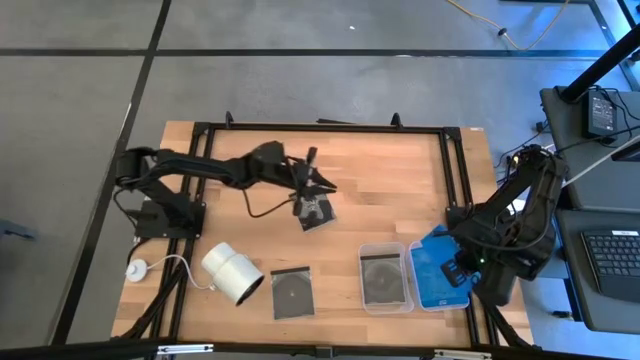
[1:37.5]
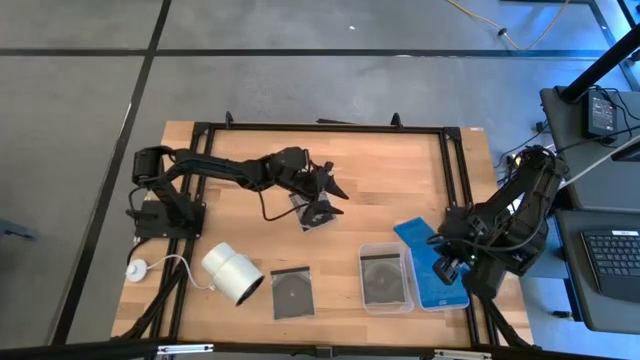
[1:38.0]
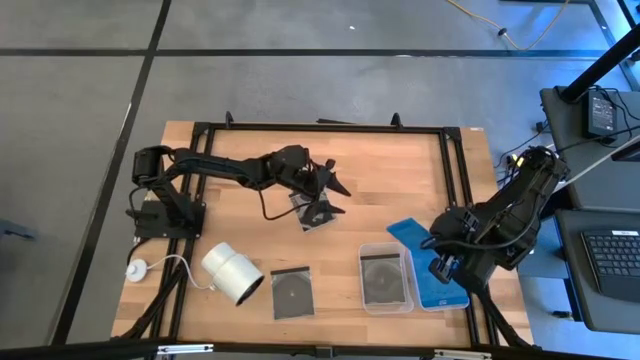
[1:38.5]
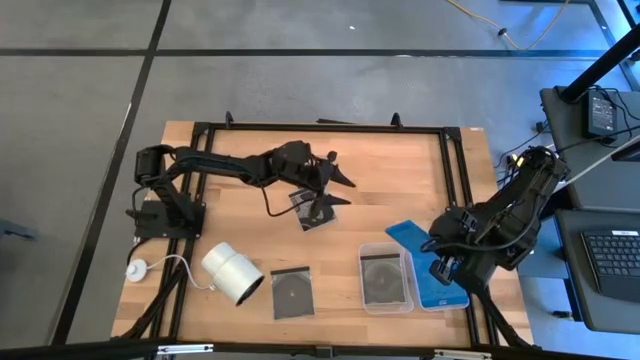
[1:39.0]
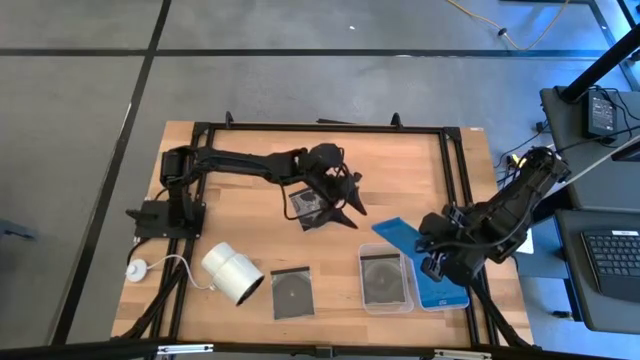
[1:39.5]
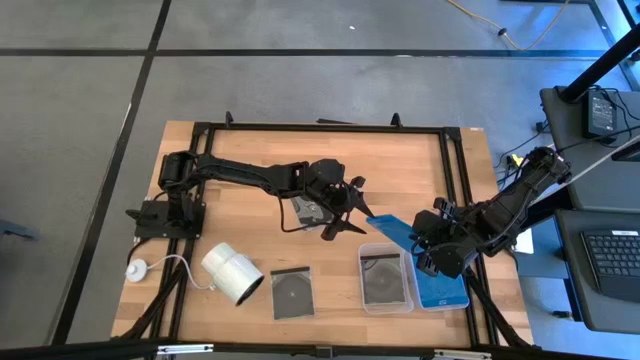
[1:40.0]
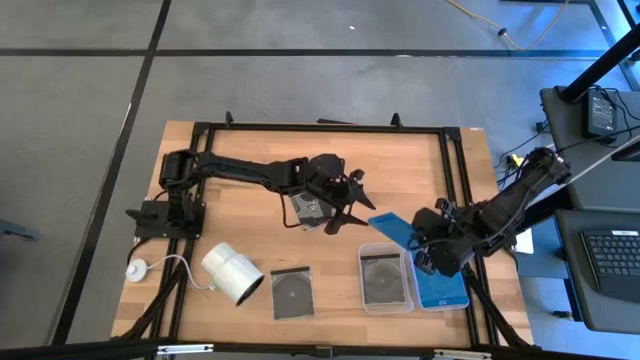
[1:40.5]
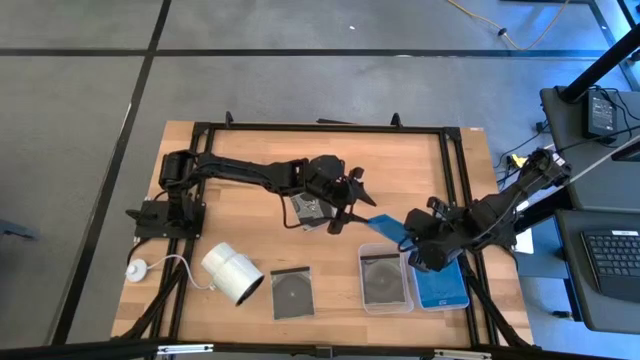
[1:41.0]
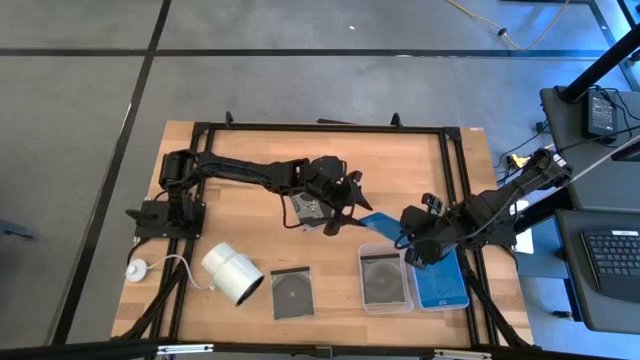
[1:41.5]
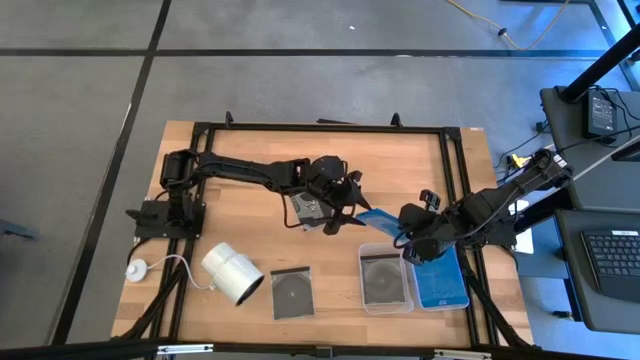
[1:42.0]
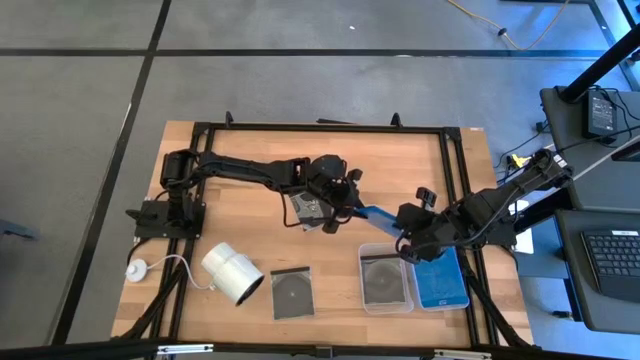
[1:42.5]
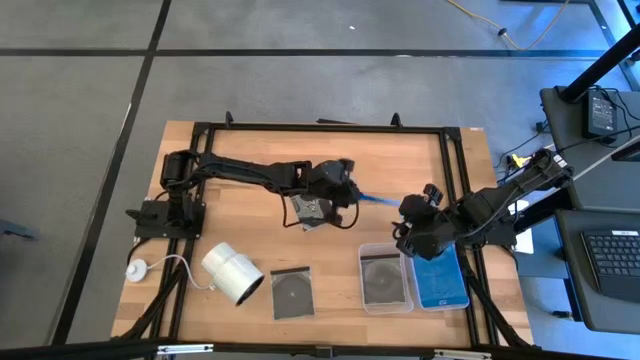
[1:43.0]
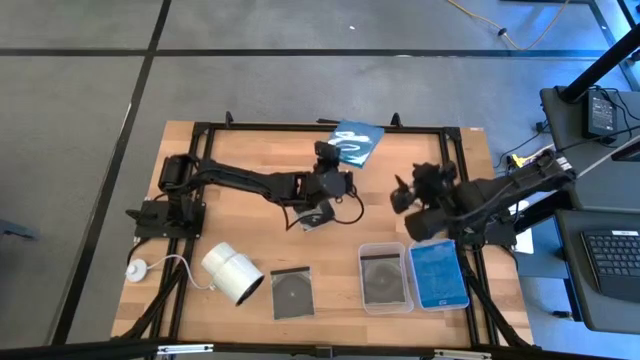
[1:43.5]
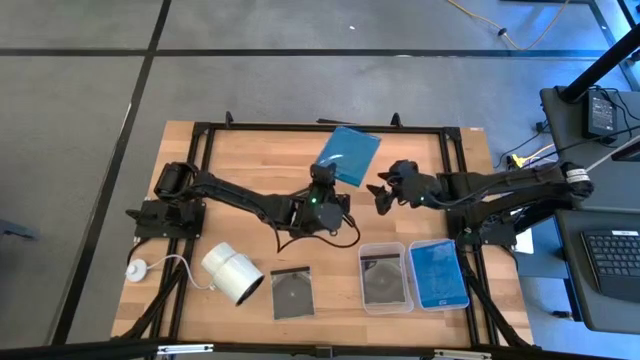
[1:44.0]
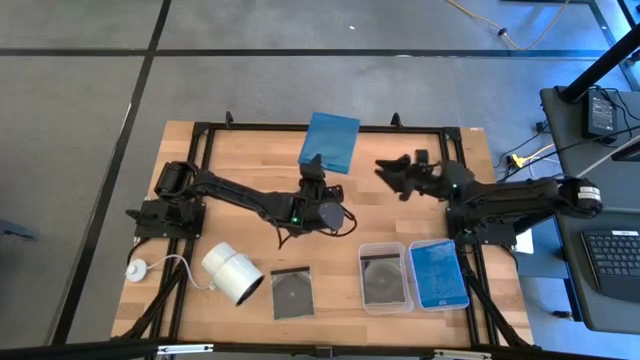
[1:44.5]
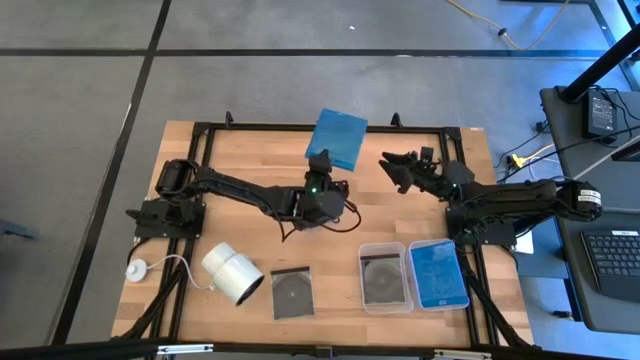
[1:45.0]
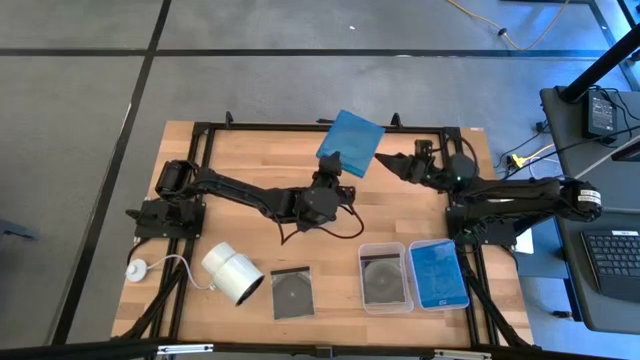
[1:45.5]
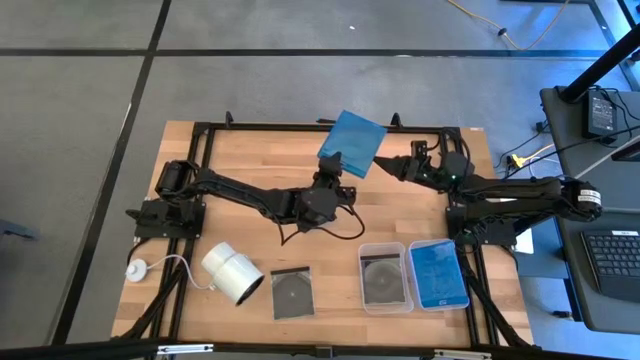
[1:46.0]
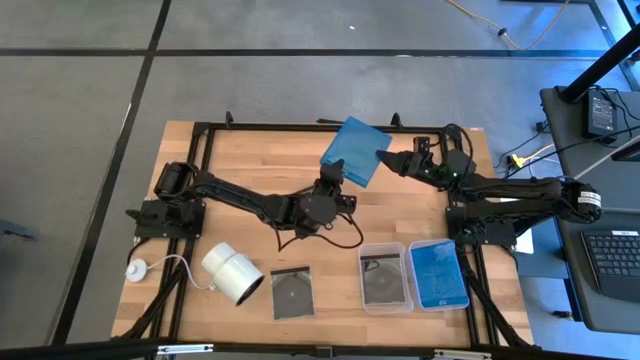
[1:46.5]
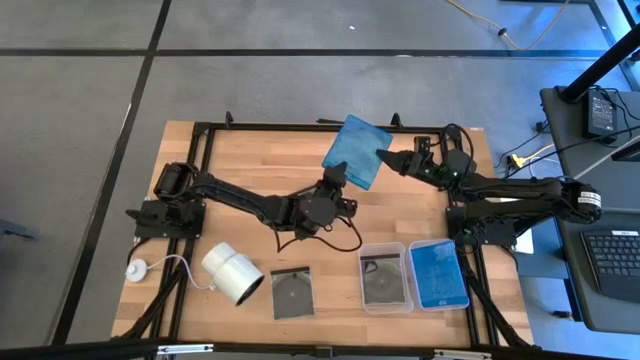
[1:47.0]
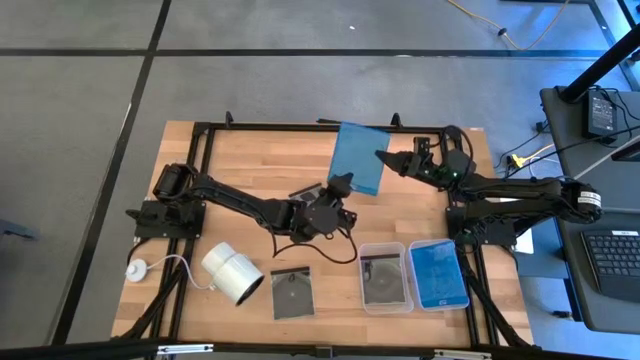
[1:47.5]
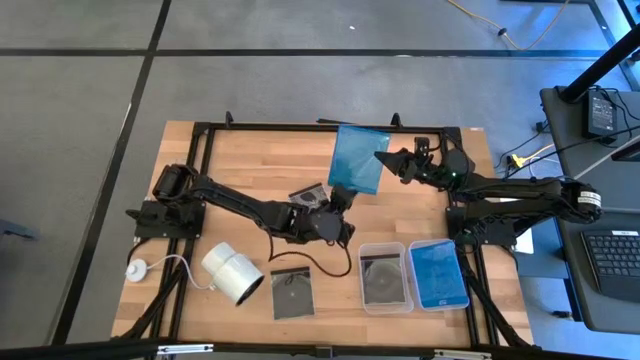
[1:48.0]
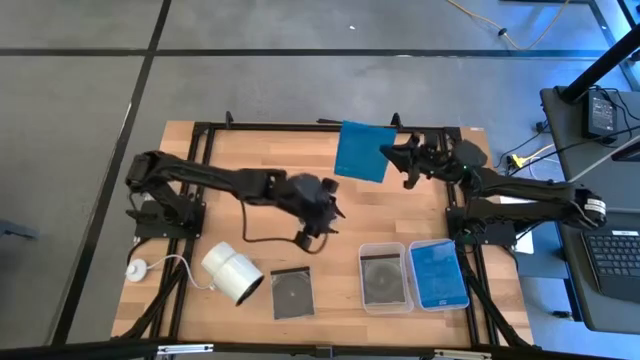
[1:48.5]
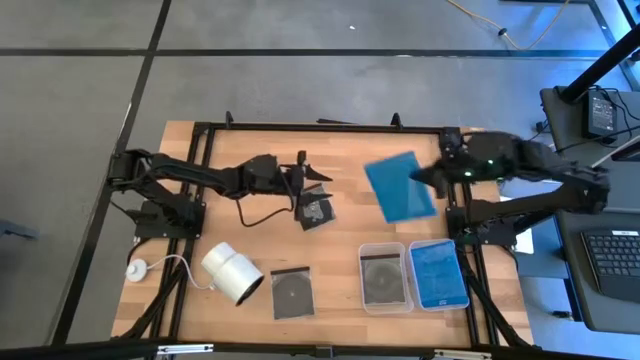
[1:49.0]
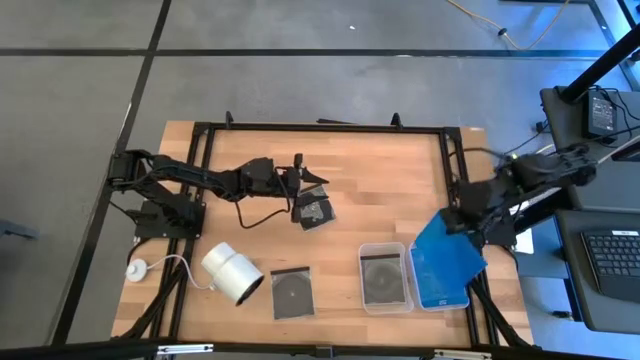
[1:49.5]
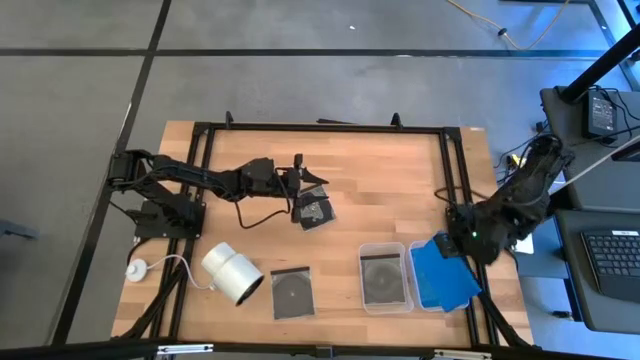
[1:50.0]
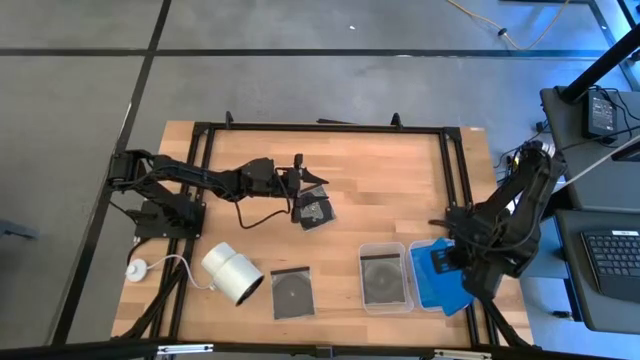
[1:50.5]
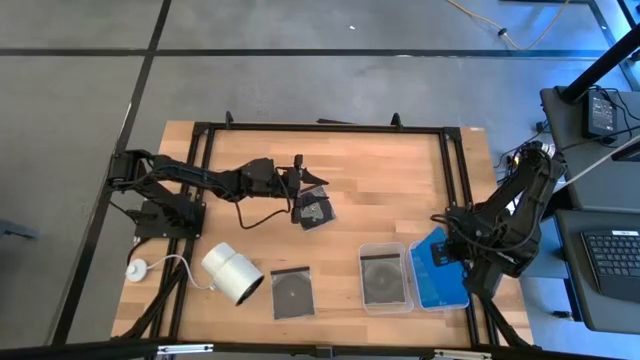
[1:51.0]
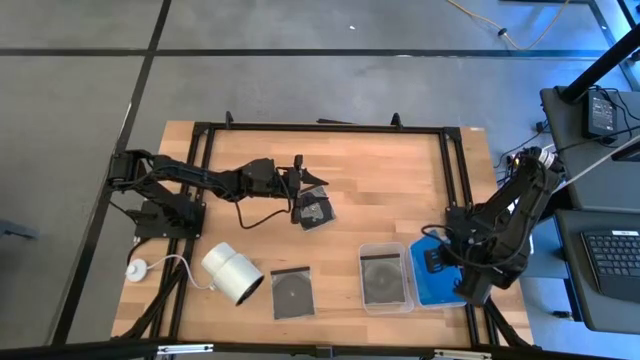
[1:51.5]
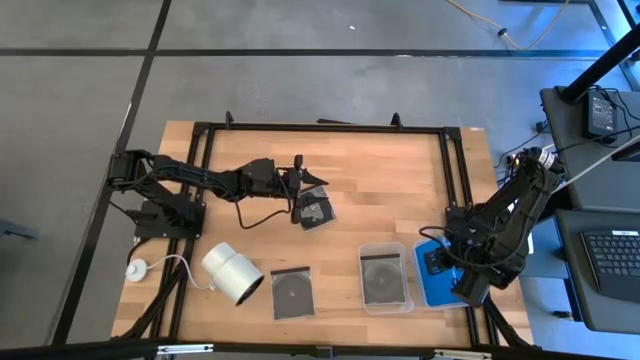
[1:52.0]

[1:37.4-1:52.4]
Task: Pick & place jewel cases by type
Put the blue CD case into the right transparent bin

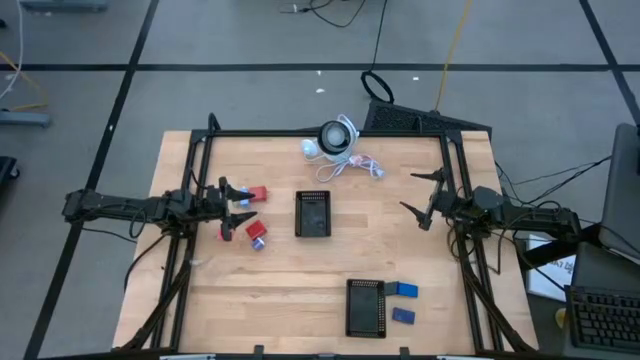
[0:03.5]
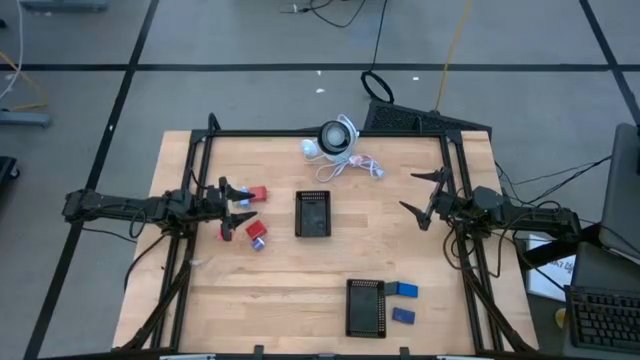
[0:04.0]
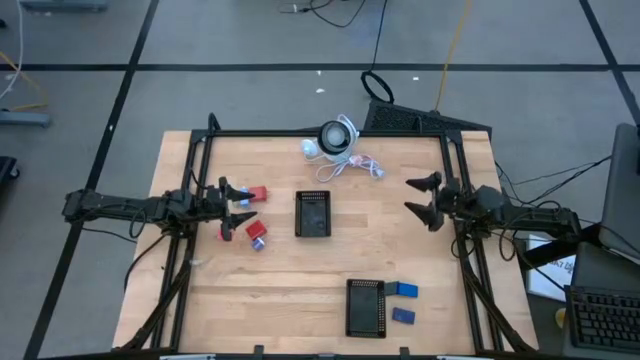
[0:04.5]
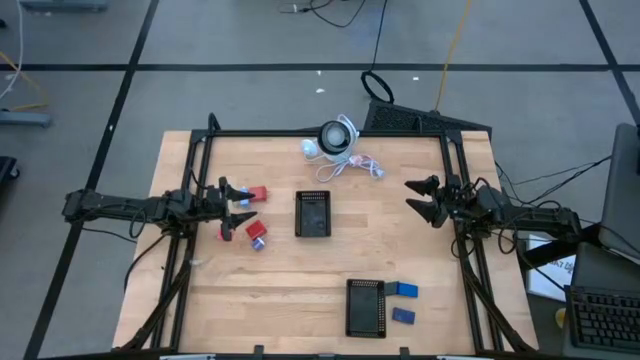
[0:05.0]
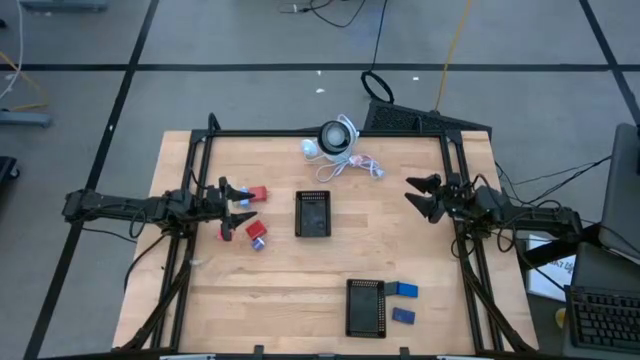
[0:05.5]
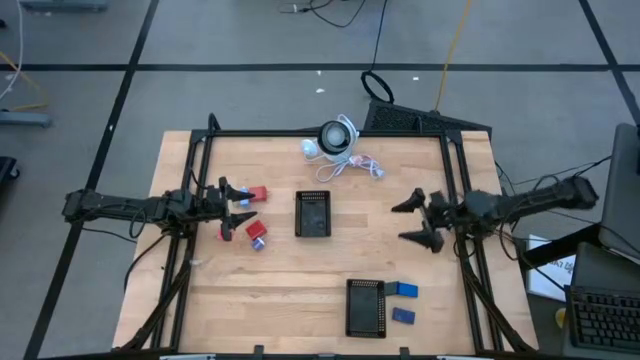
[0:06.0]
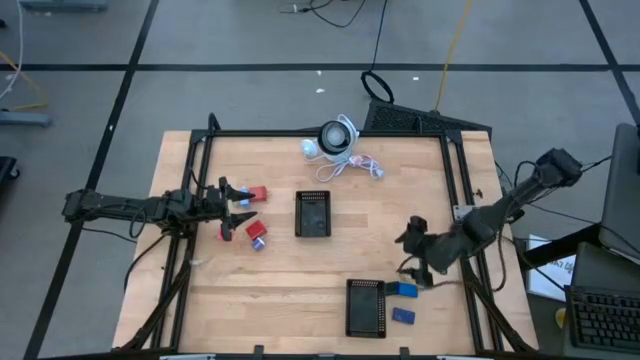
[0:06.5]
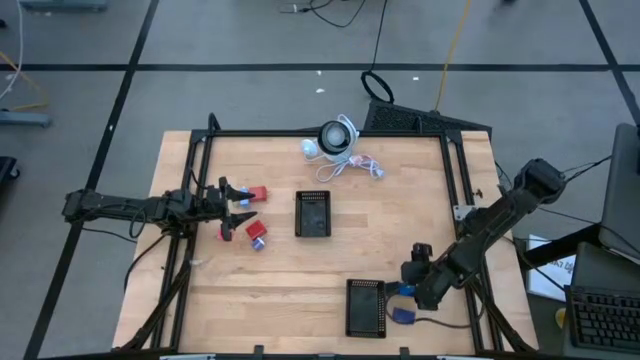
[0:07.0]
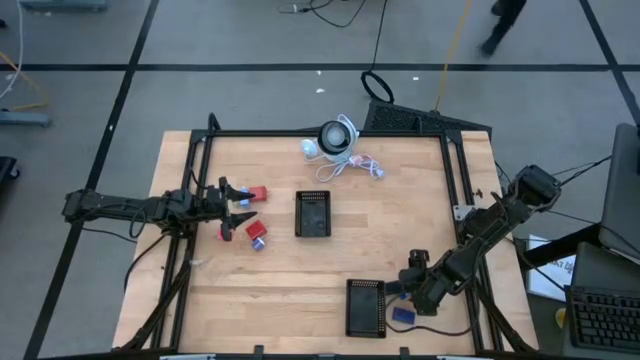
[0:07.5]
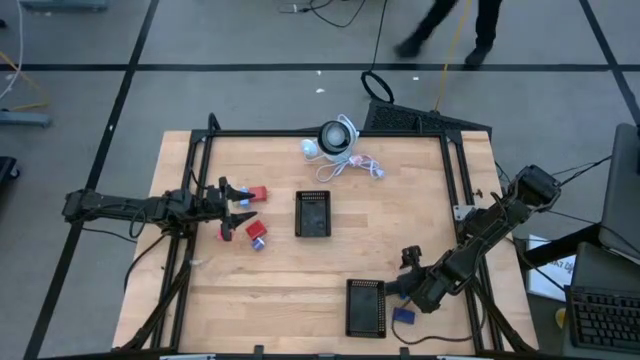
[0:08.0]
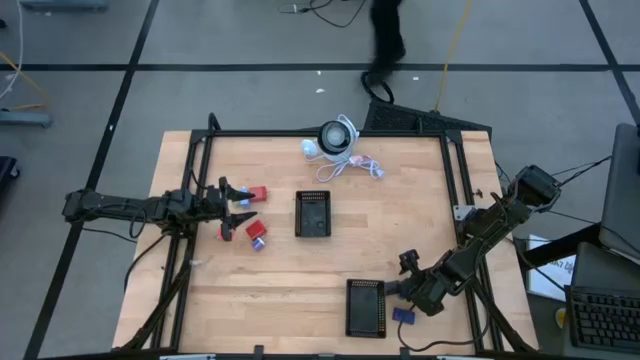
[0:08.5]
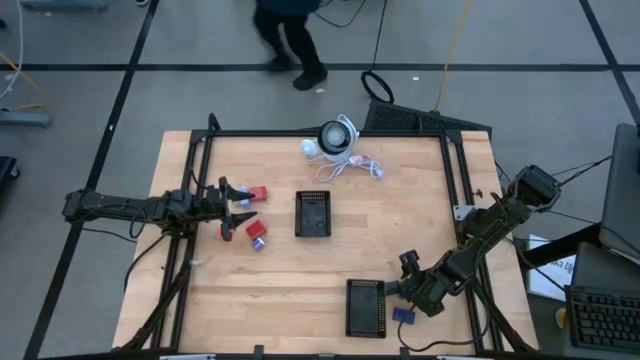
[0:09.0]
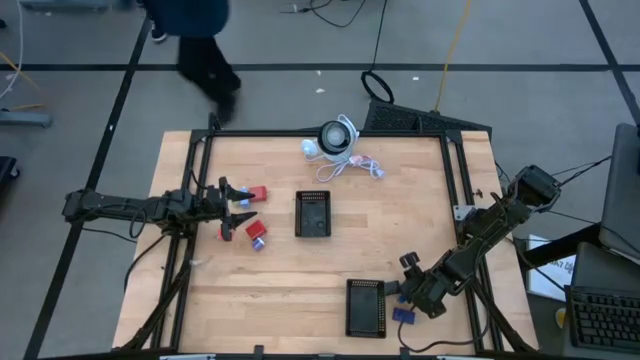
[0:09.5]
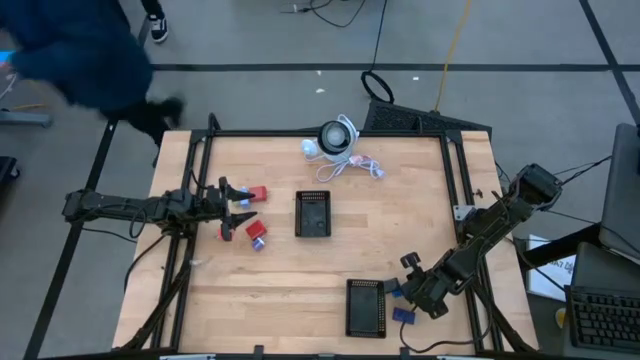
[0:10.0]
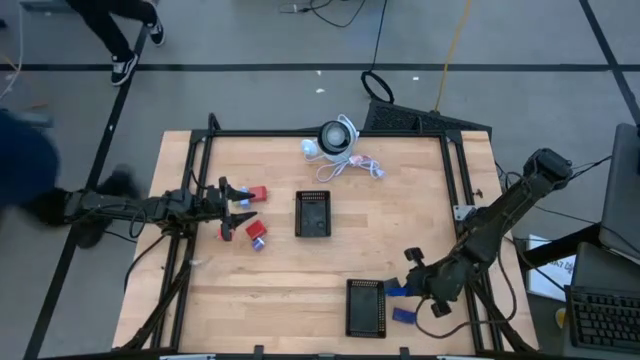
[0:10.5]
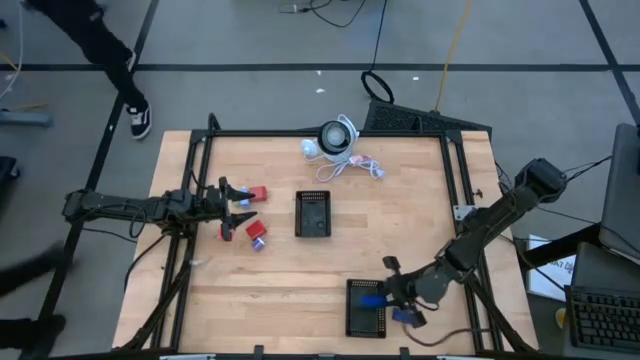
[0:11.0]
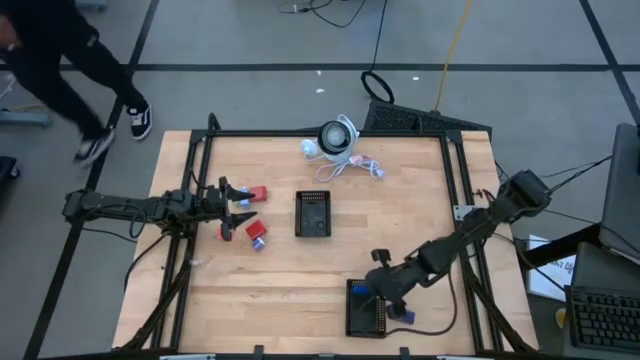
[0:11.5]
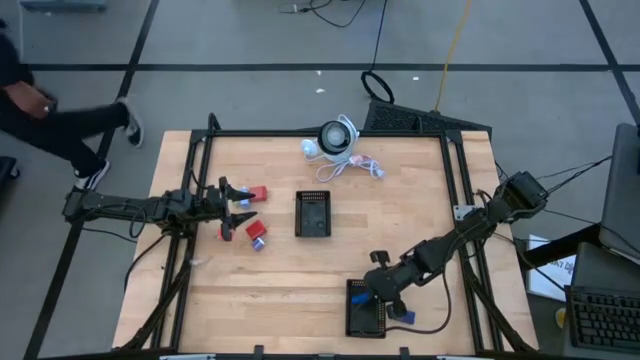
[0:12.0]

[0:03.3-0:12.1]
Task: Pick & Place Office items
Put the blue digital timer into the bottom black basket
